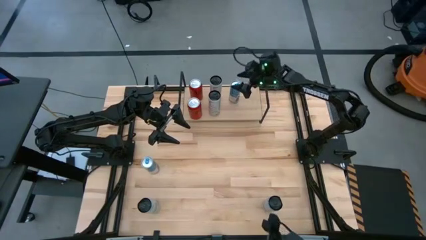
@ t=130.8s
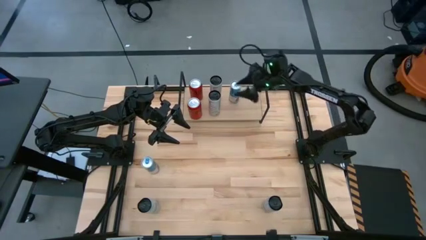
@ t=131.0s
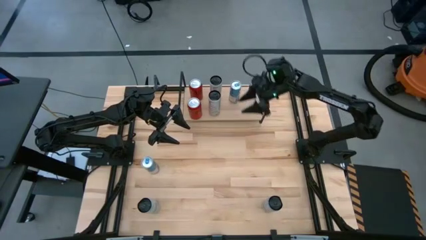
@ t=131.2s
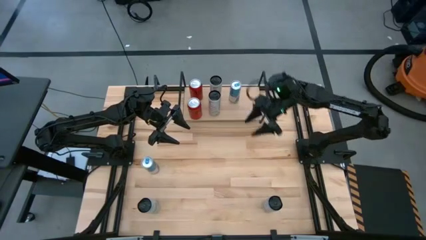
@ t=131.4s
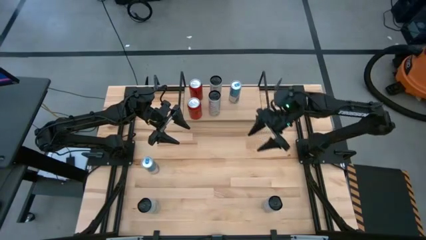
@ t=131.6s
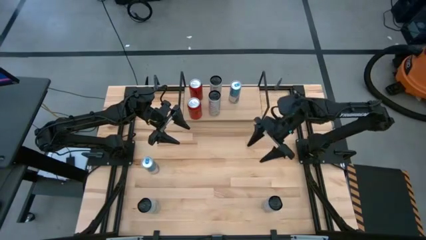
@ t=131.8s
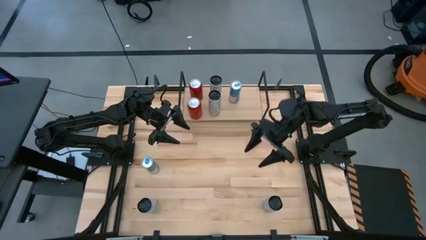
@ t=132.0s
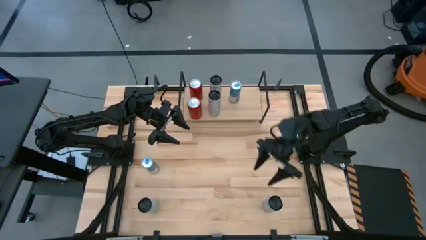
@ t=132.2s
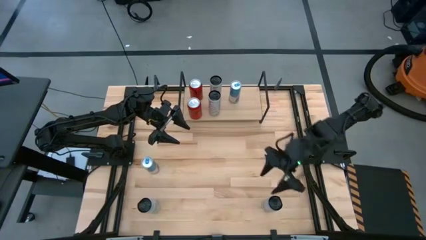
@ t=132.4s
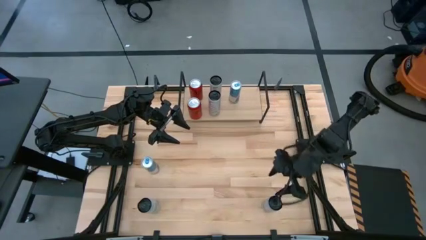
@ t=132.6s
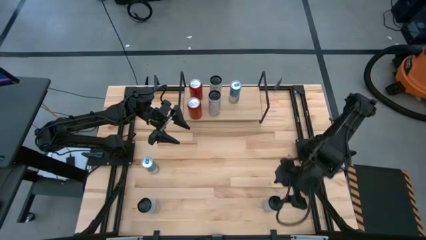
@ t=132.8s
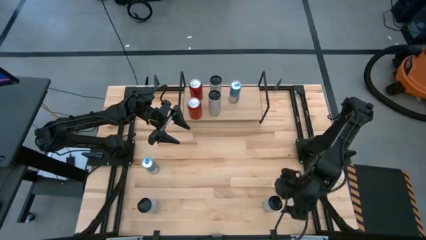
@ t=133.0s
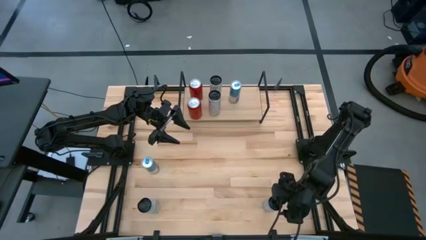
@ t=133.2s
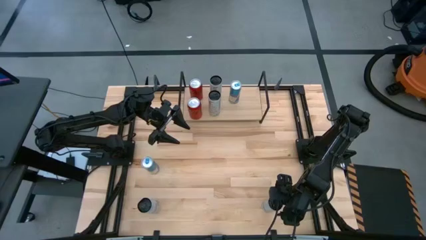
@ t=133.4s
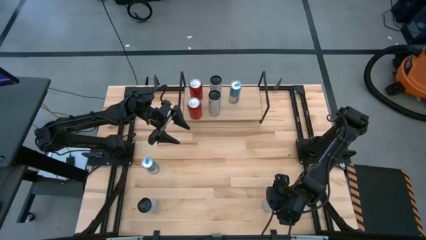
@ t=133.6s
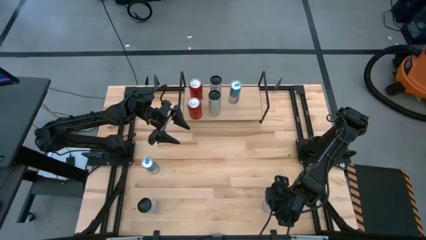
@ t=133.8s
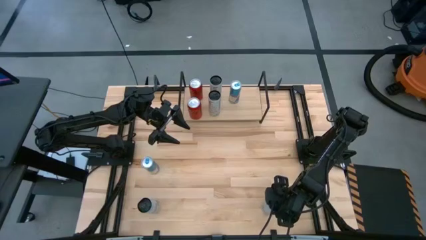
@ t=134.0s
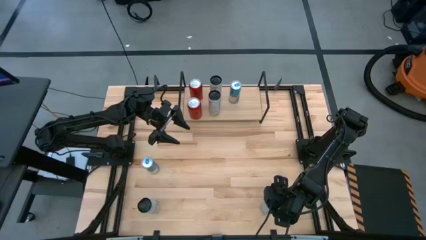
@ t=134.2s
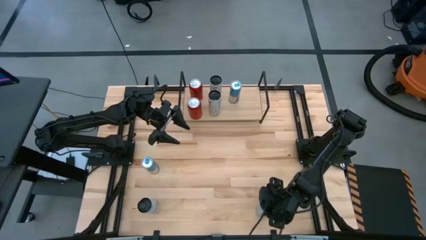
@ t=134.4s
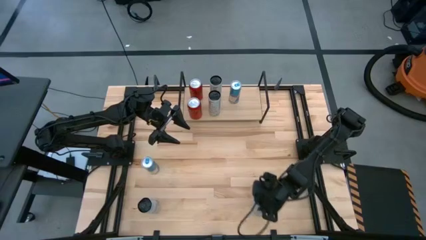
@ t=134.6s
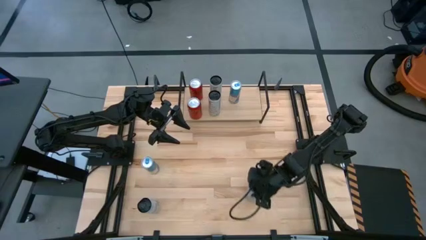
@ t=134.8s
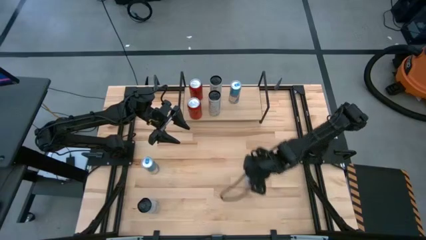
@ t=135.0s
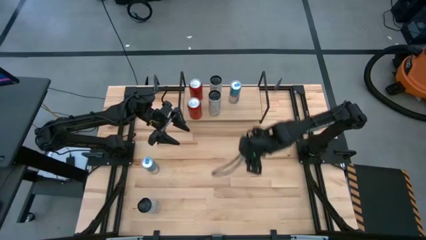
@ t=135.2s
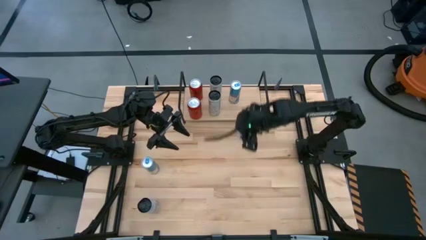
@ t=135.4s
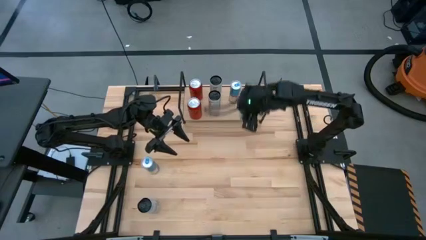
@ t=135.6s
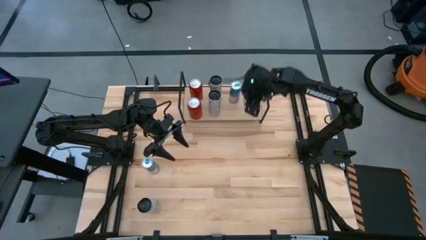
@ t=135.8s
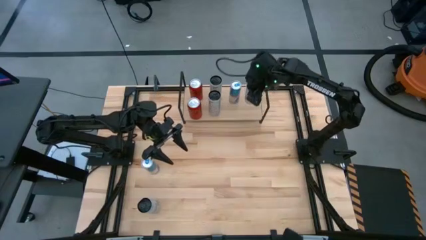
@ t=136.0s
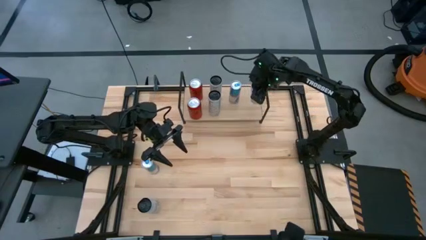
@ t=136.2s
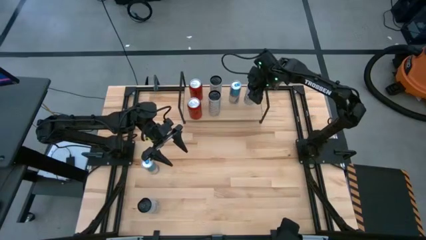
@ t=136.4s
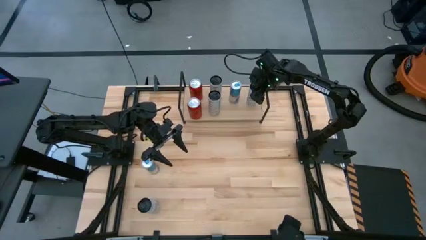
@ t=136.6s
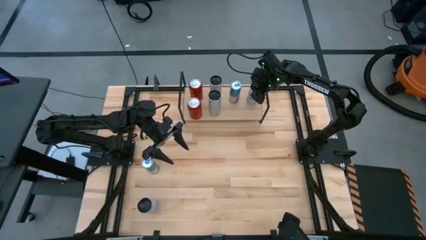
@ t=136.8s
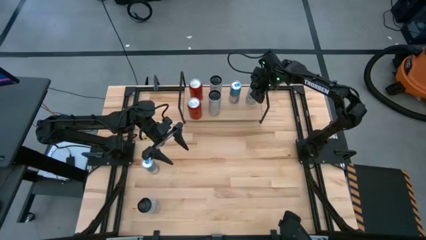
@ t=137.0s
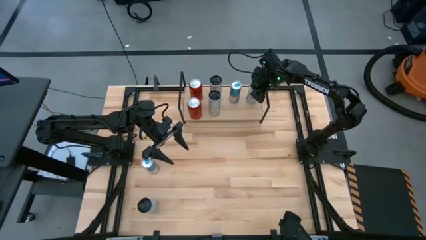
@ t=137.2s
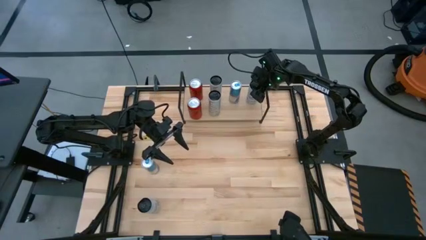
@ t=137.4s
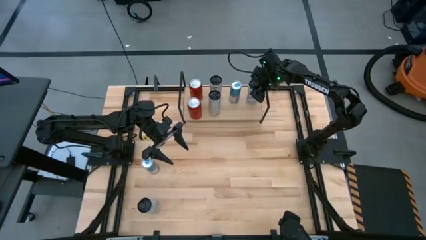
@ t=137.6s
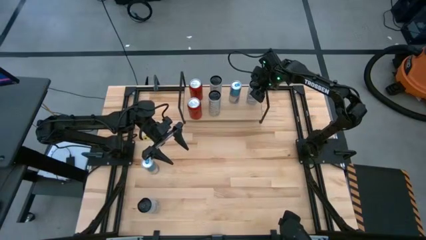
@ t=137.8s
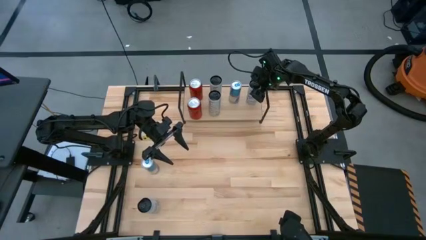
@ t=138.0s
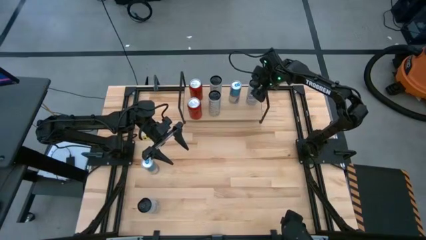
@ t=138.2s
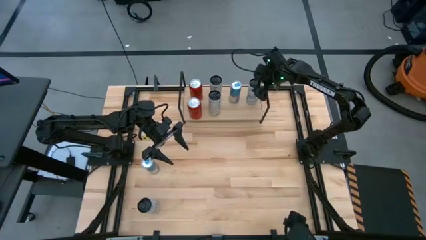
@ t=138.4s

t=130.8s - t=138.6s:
Task: Place canned beverage on shelf
Put the right white blue soda can on the shelf
